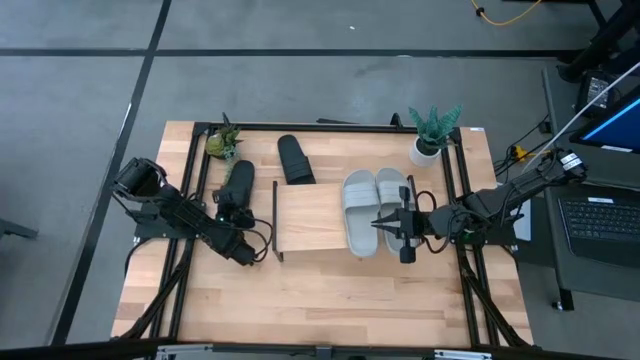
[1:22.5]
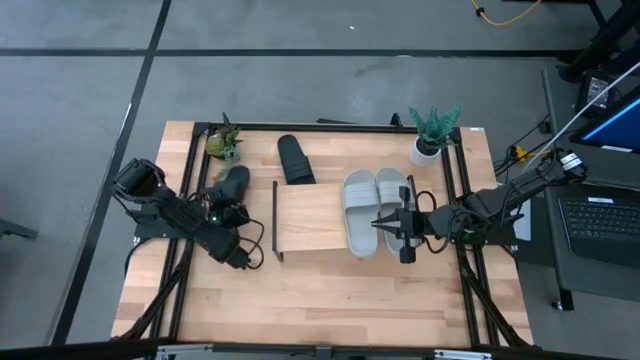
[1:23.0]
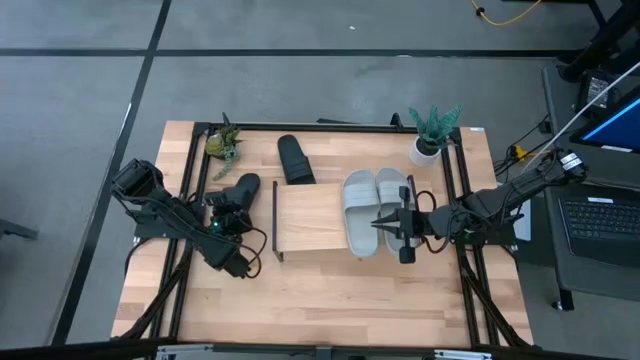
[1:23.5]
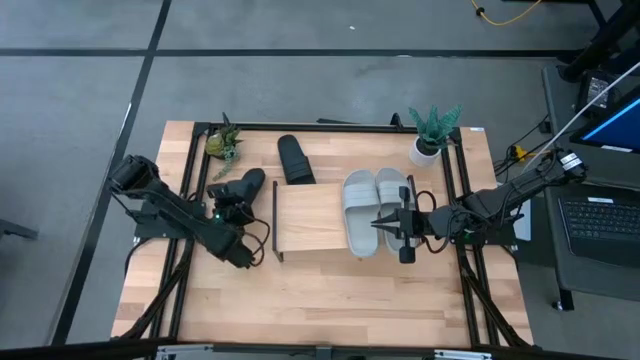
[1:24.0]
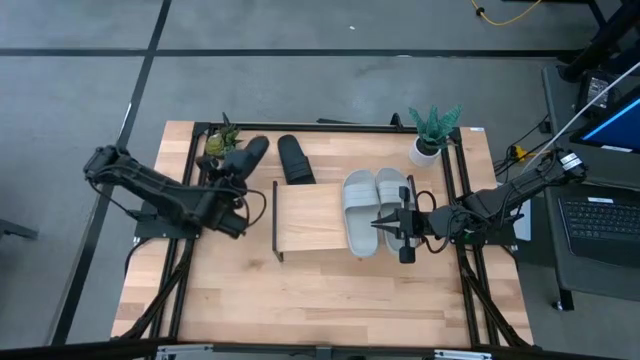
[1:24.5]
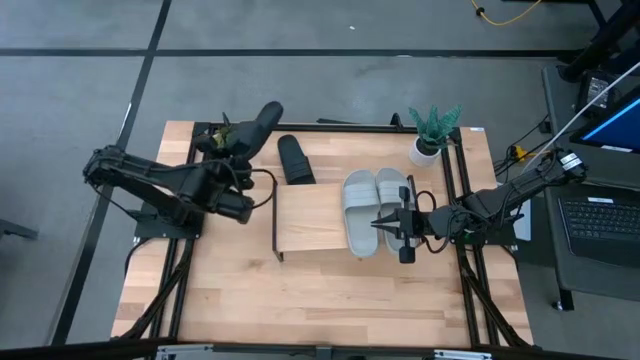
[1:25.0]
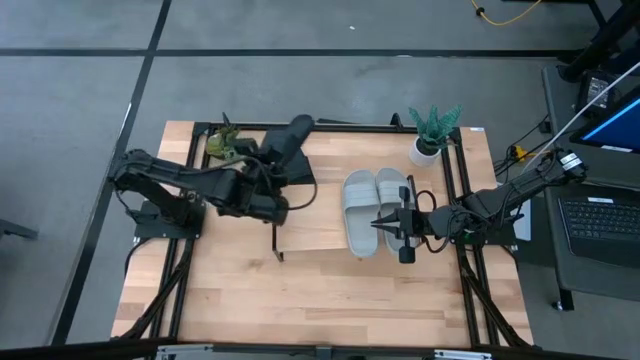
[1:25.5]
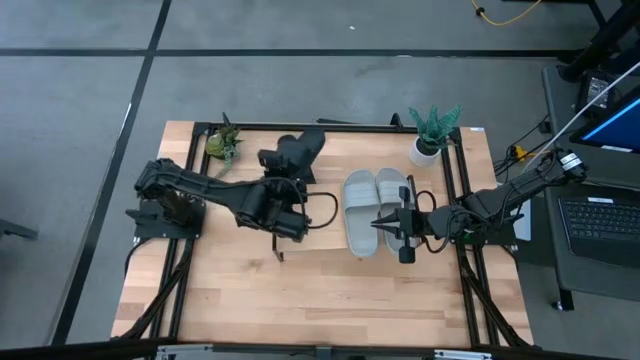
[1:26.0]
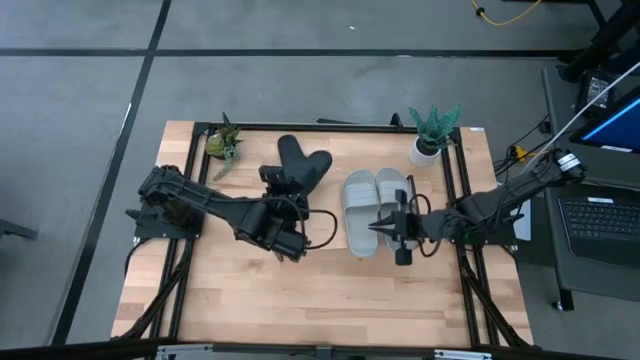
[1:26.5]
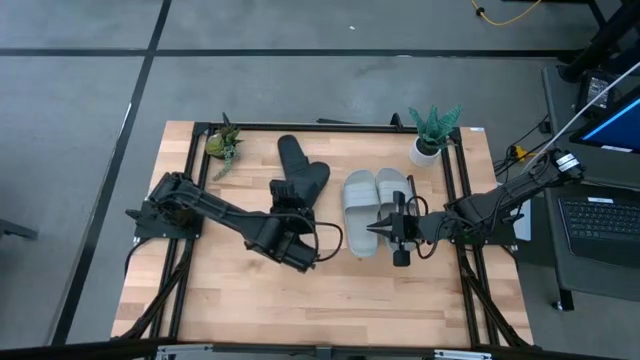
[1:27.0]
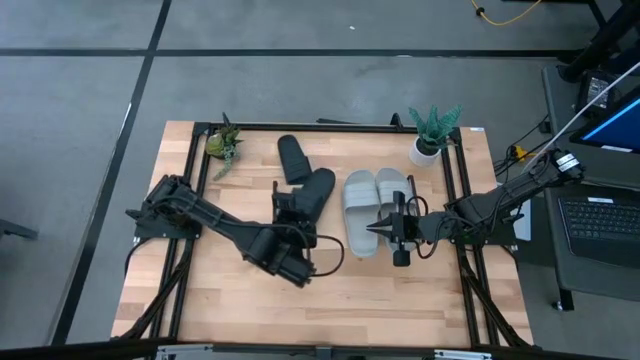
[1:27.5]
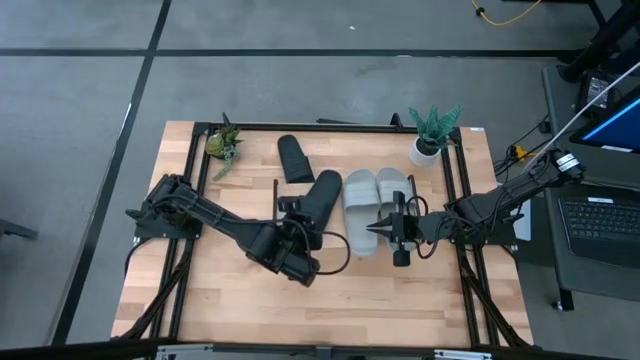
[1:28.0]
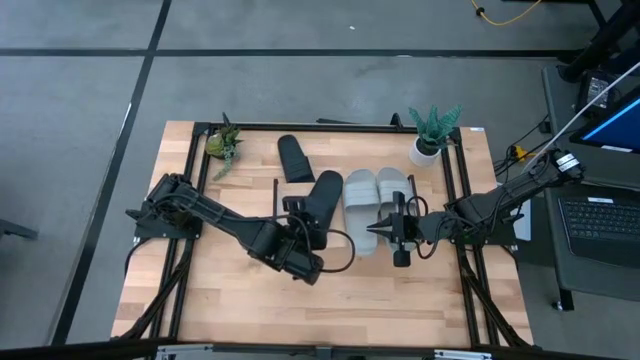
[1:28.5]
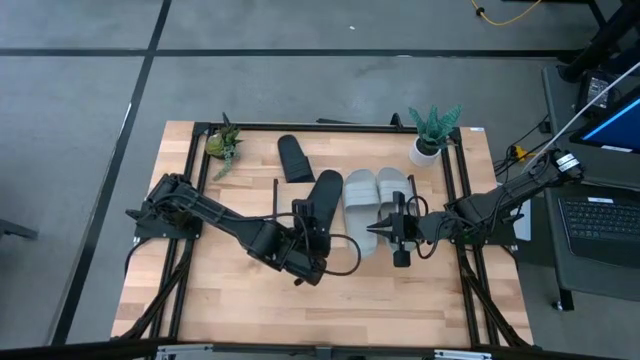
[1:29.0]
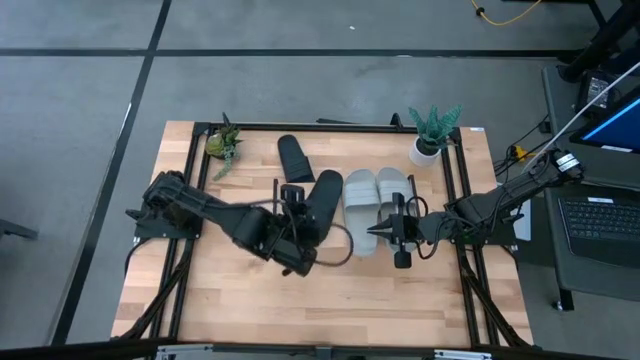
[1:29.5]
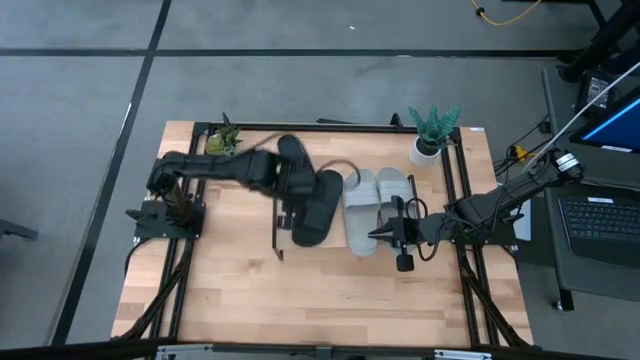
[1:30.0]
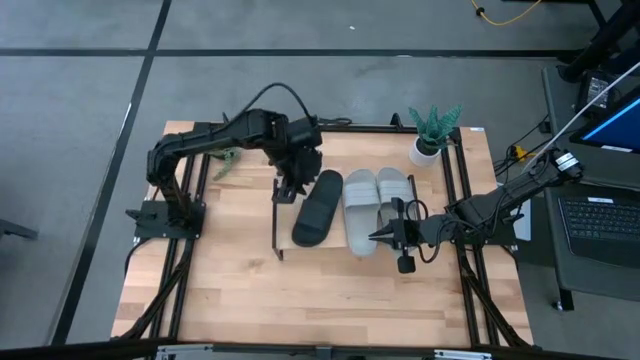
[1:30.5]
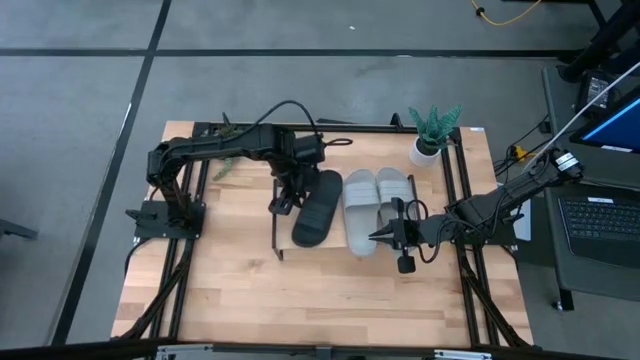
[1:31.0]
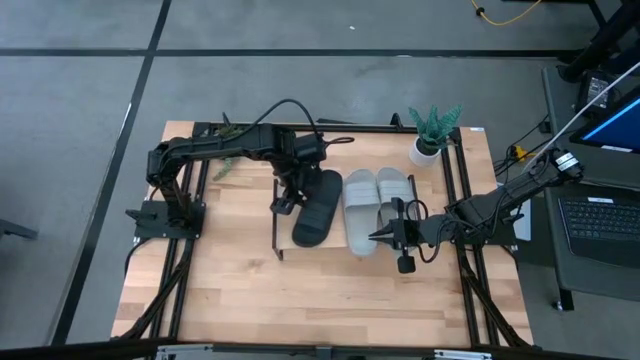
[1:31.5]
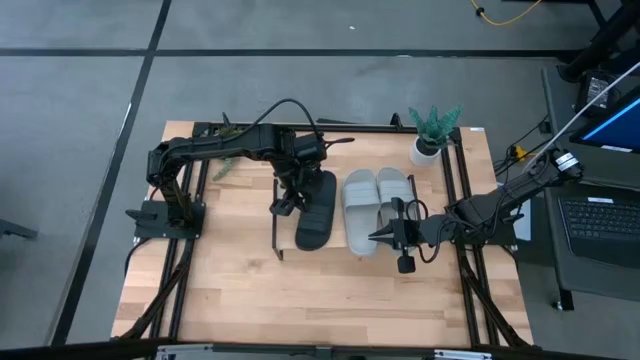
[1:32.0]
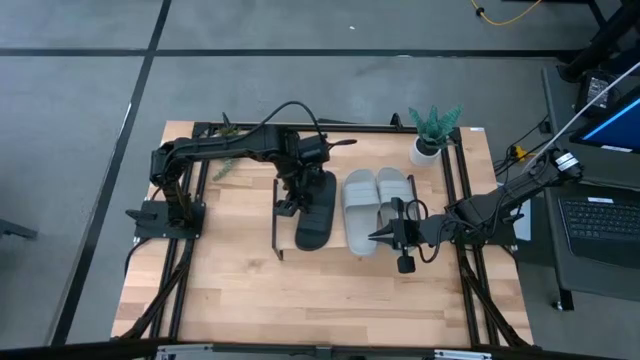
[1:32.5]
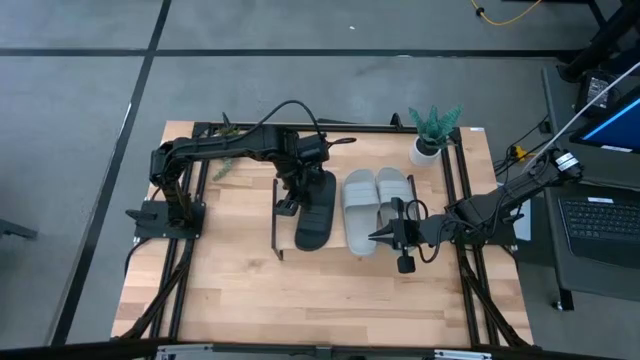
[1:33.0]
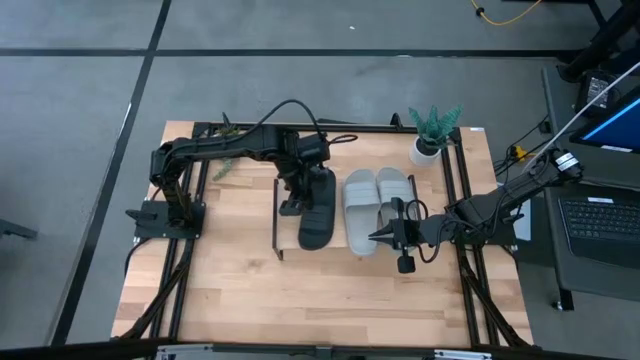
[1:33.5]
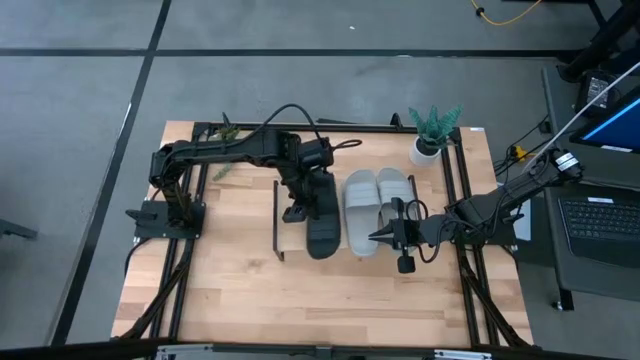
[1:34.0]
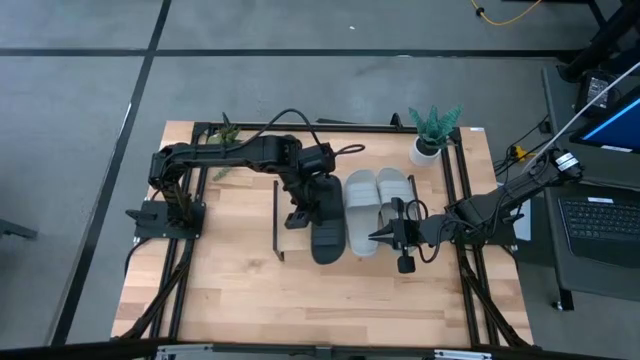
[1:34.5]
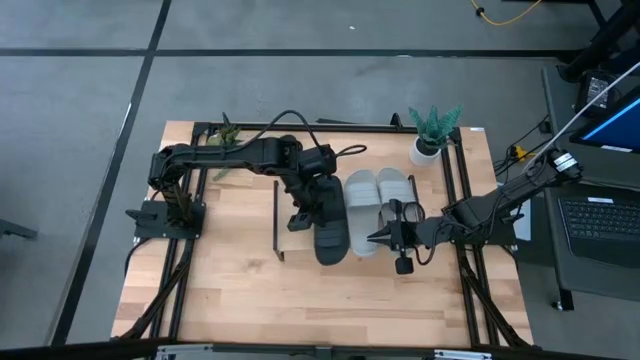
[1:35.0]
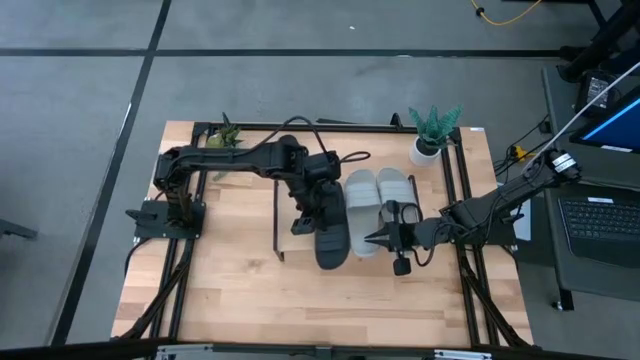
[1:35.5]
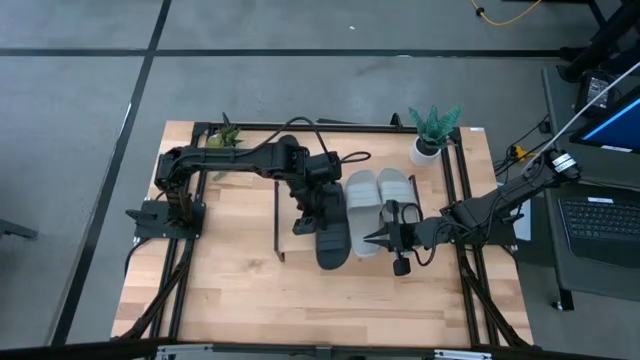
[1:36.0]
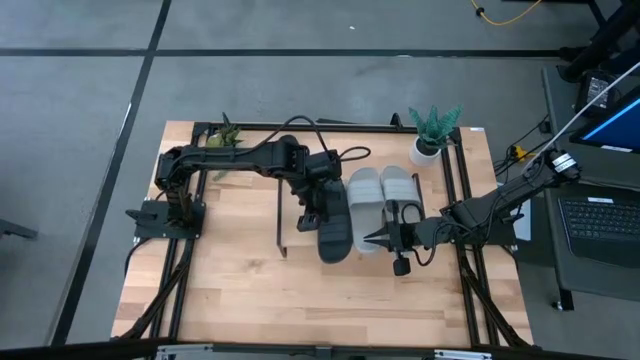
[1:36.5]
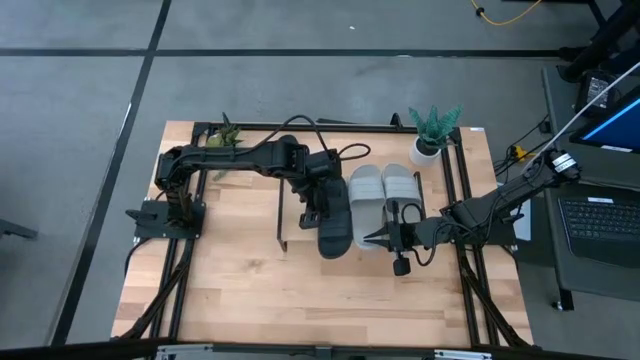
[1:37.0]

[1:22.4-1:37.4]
Task: Pick and place slides into the shelf
Put the left black slide on the shelf

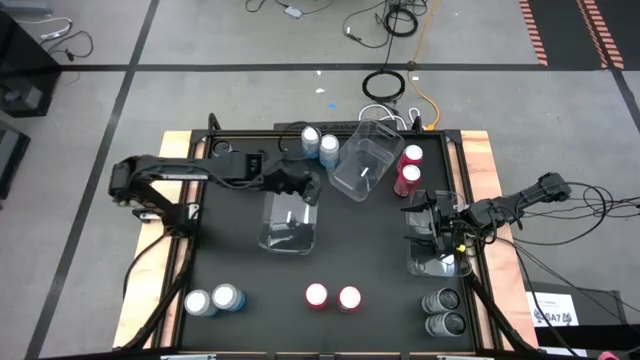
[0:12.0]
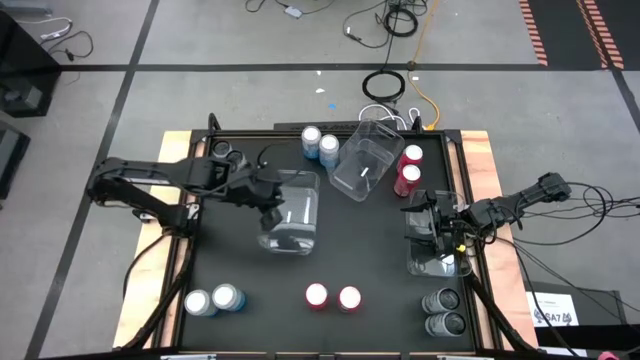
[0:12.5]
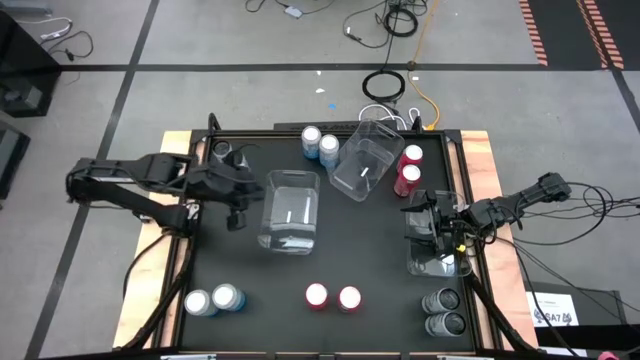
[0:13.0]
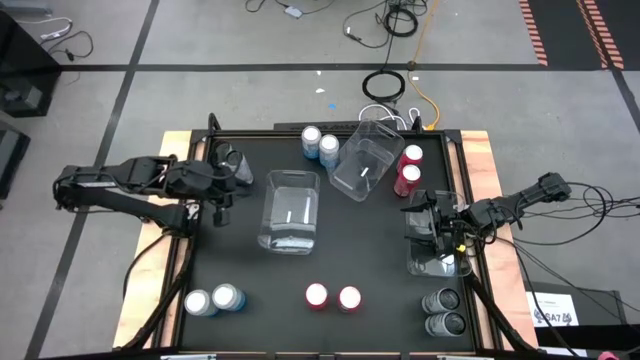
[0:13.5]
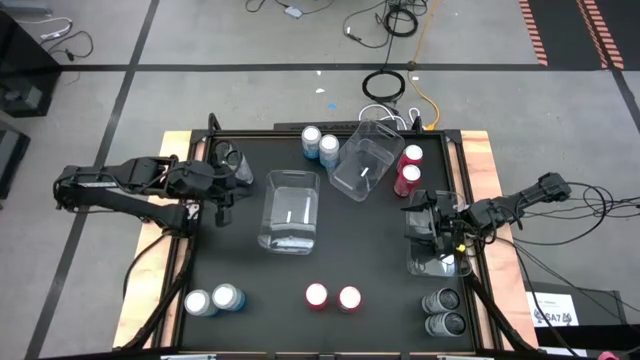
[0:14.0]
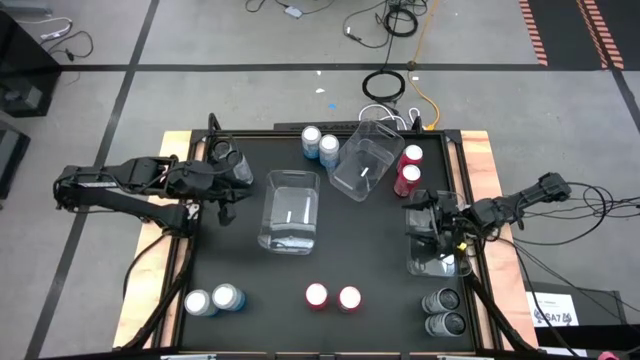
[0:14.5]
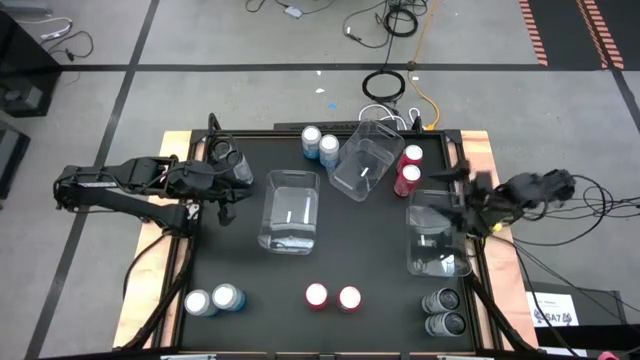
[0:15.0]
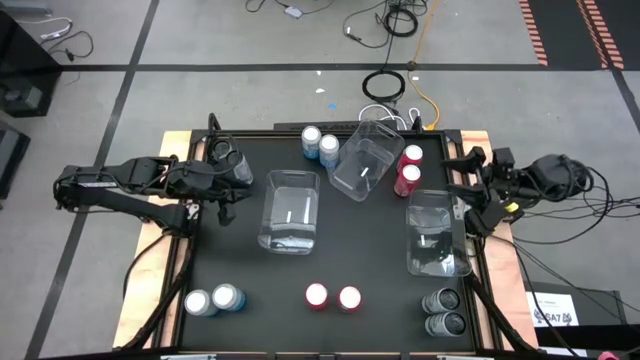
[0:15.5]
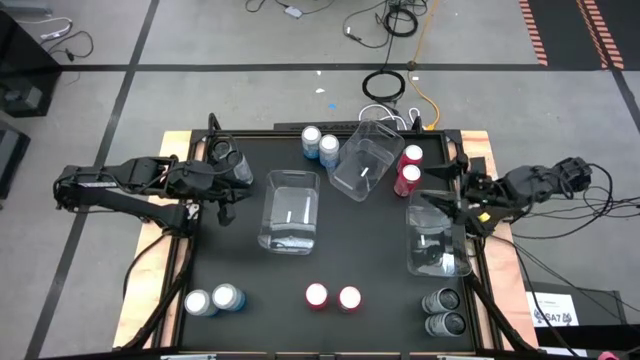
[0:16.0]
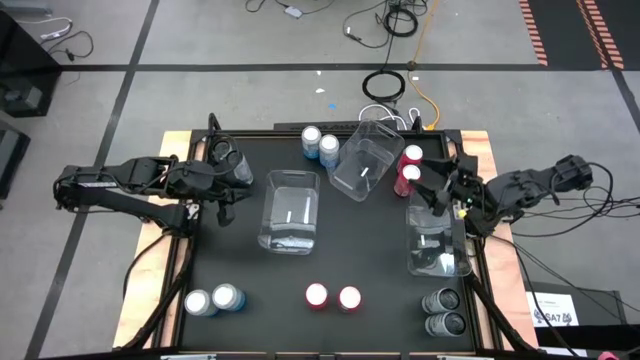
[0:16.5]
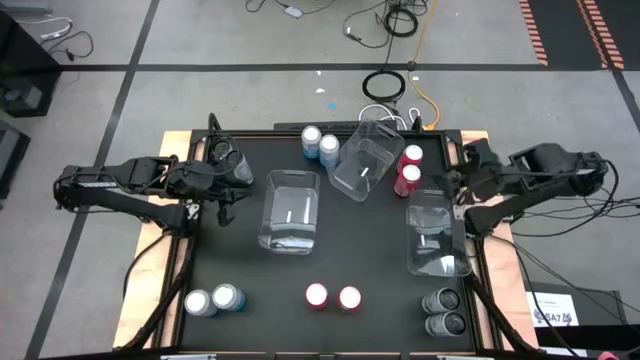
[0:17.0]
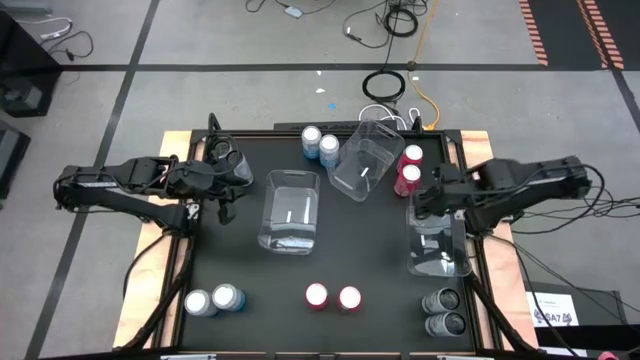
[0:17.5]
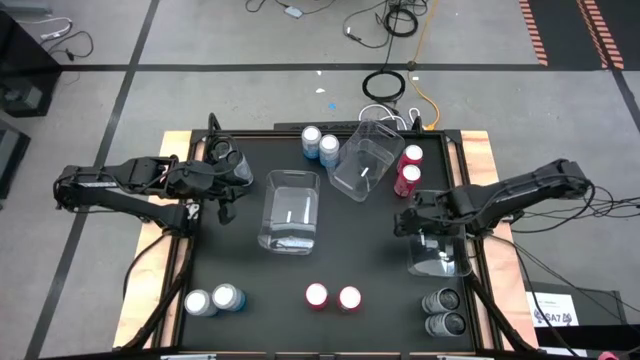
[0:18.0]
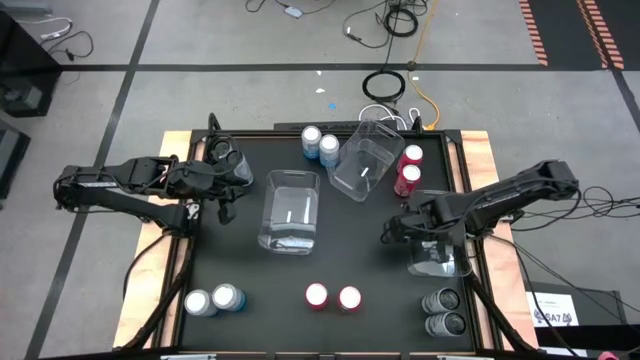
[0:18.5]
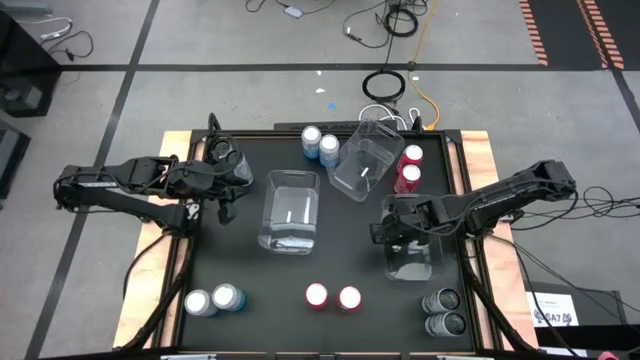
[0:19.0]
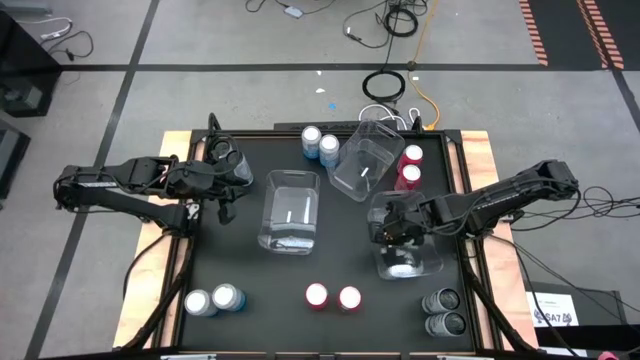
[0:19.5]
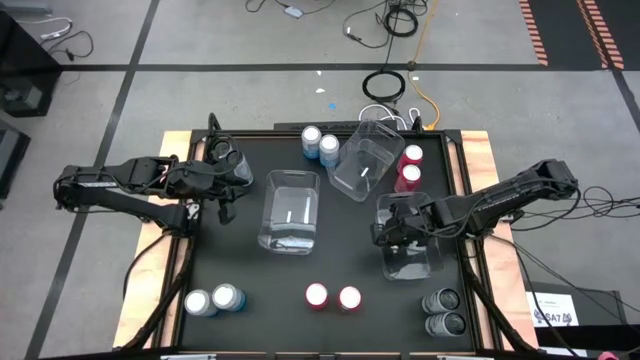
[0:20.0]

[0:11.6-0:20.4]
Task: Sort soda cans
Adjust the right transparent bin
